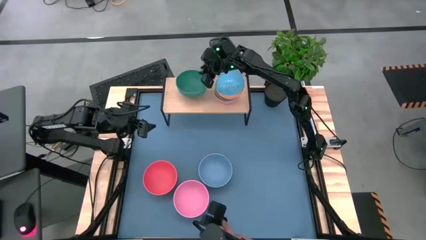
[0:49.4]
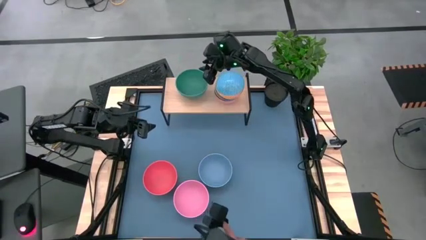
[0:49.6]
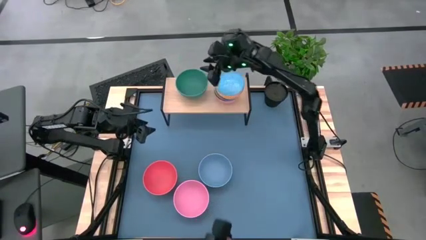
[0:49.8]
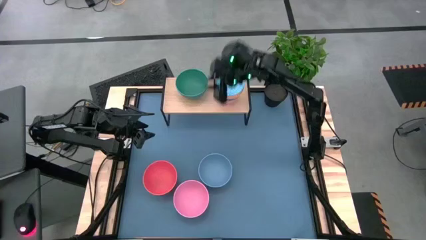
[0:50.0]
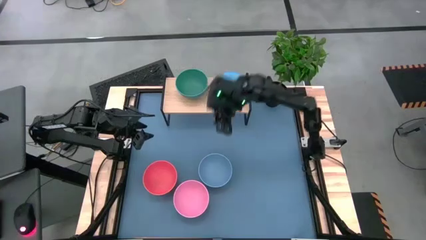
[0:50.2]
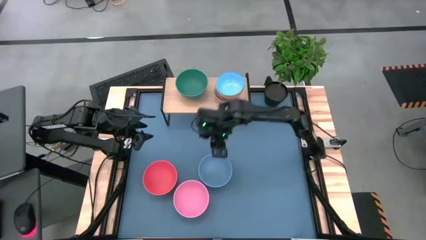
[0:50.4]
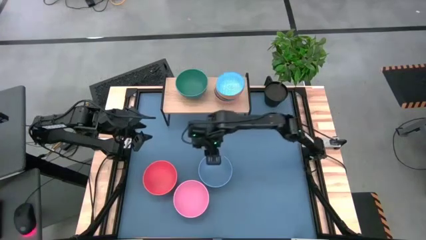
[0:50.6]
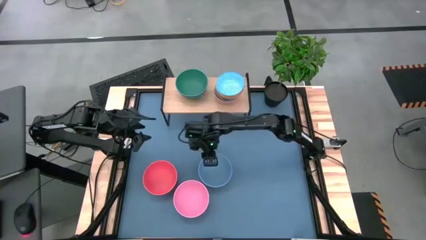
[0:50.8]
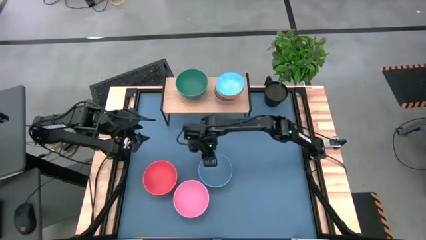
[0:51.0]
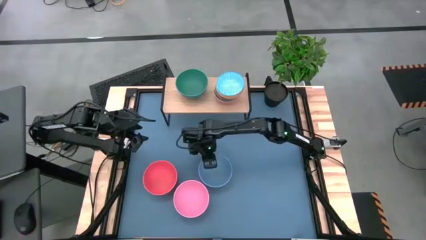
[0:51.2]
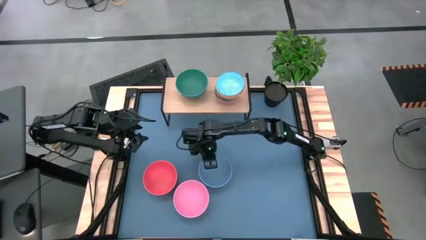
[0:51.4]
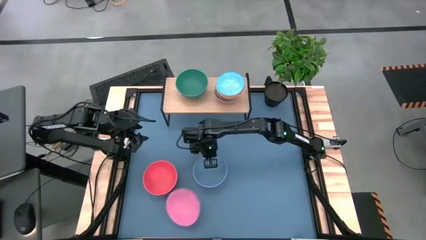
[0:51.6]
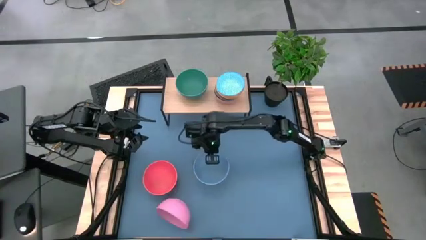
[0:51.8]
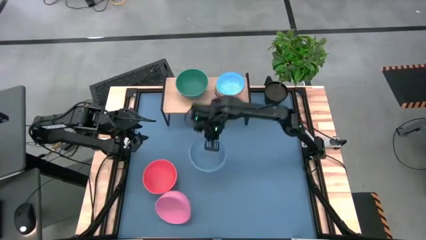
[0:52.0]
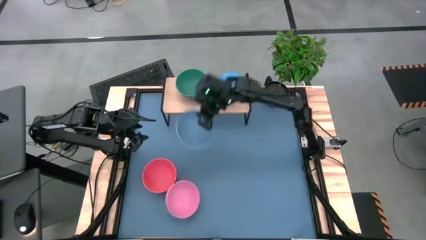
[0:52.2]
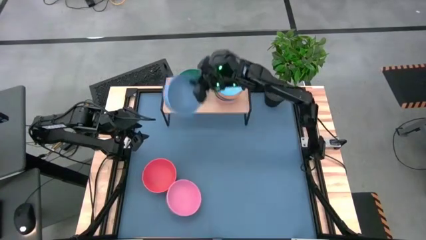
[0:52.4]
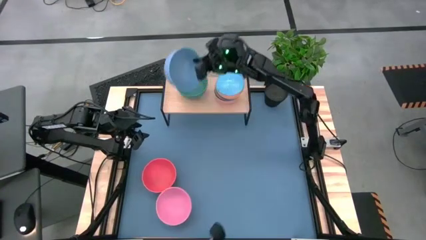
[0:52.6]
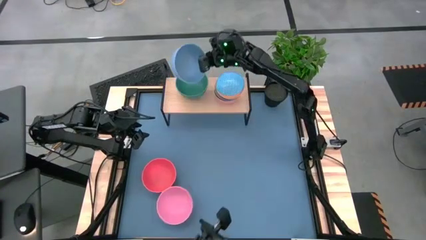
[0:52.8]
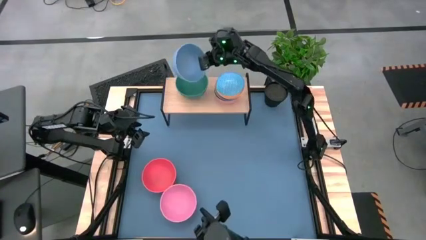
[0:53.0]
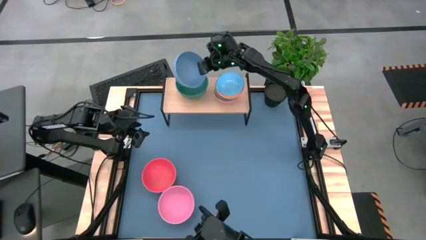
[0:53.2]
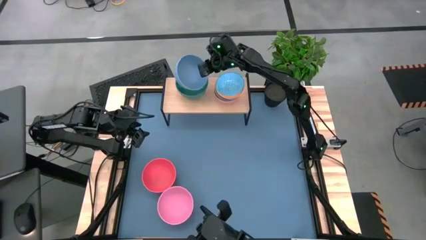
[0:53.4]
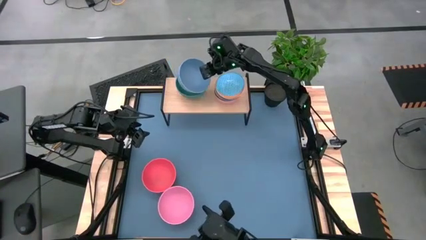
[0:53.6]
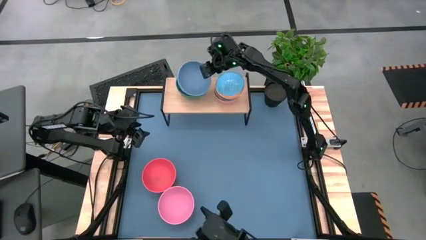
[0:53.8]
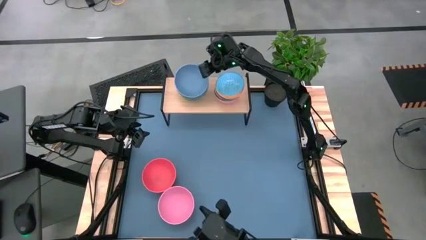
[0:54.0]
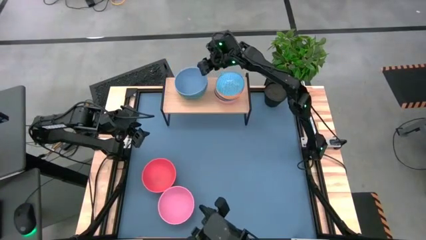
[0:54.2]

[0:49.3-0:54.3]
Task: Place and stack bowls onto a shelf
Stack the blue bowl on top of the green bowl on the shelf

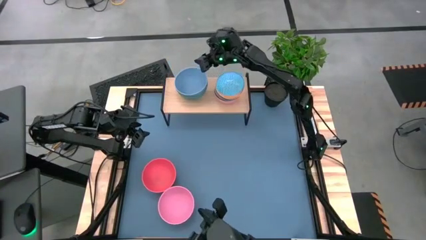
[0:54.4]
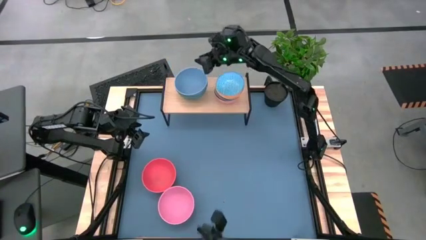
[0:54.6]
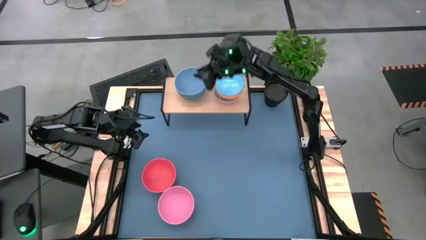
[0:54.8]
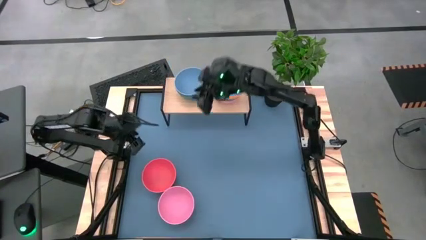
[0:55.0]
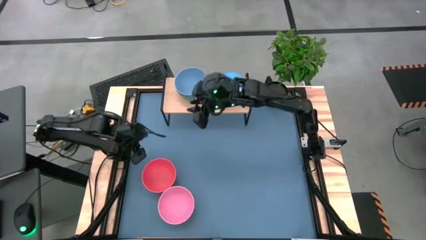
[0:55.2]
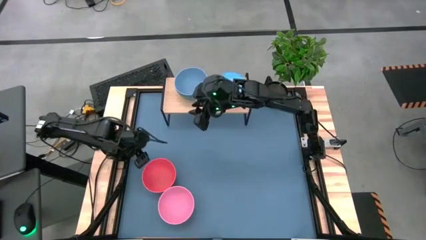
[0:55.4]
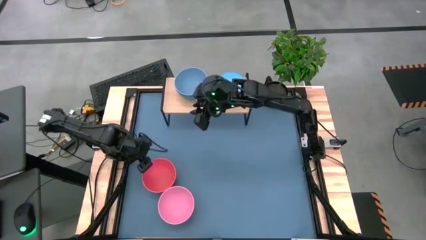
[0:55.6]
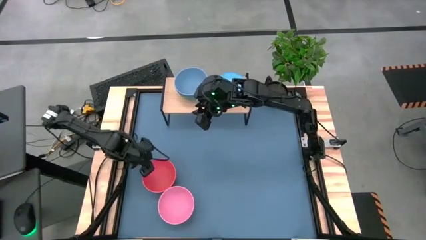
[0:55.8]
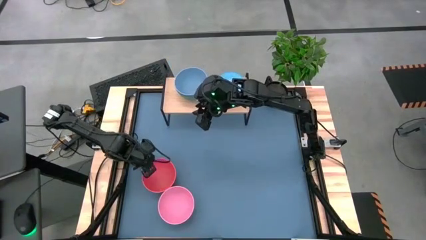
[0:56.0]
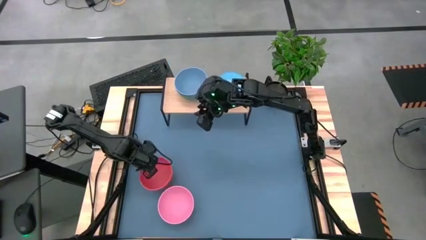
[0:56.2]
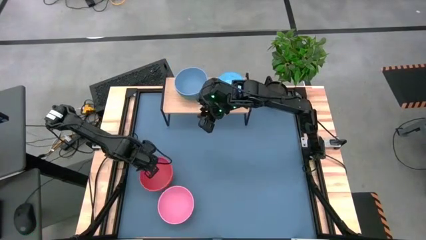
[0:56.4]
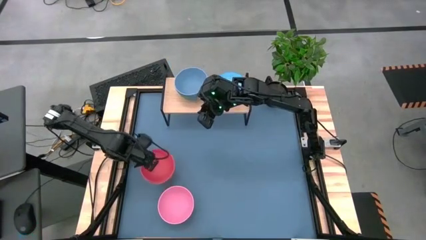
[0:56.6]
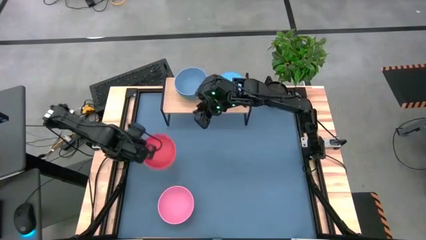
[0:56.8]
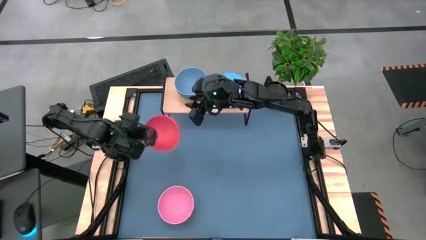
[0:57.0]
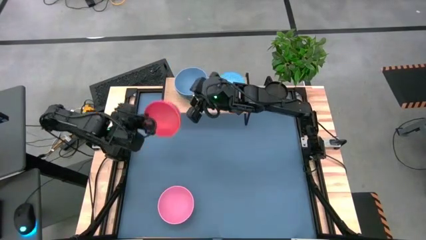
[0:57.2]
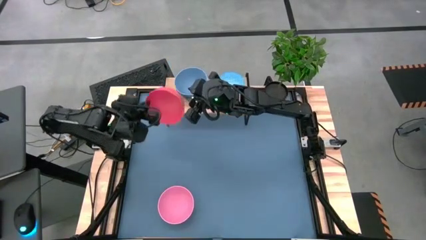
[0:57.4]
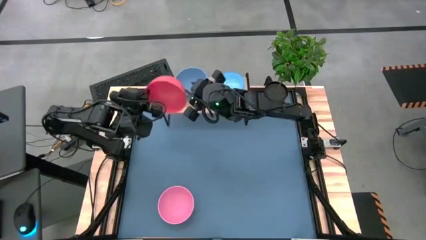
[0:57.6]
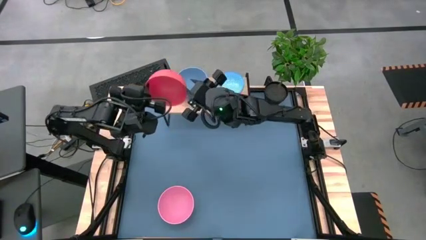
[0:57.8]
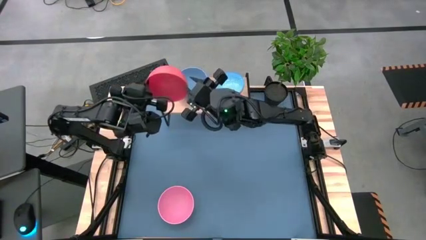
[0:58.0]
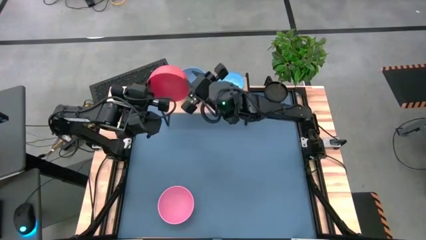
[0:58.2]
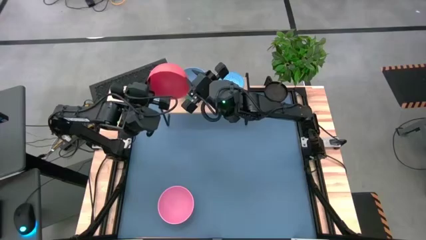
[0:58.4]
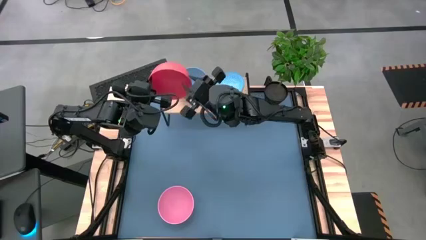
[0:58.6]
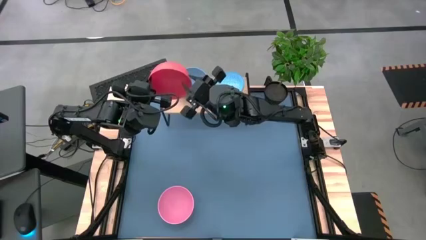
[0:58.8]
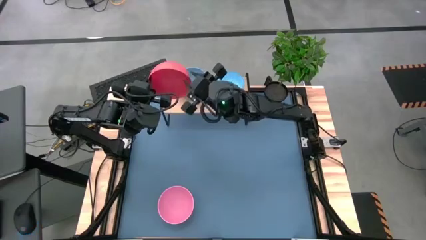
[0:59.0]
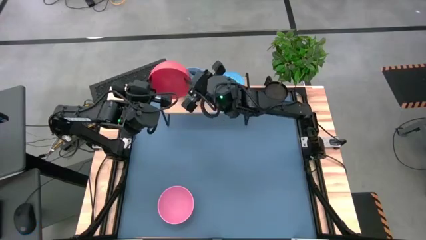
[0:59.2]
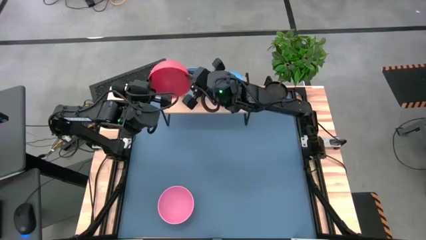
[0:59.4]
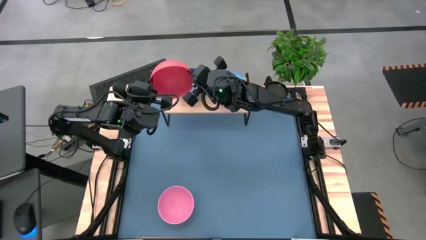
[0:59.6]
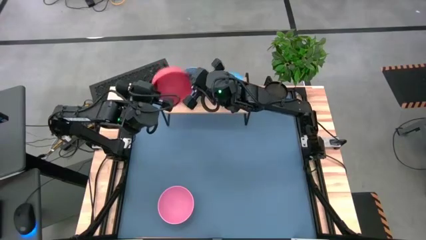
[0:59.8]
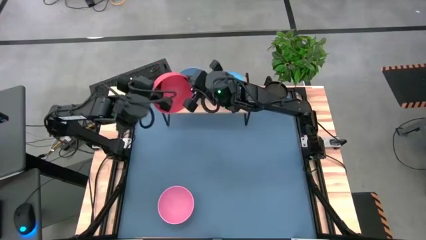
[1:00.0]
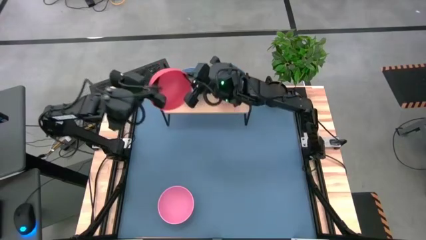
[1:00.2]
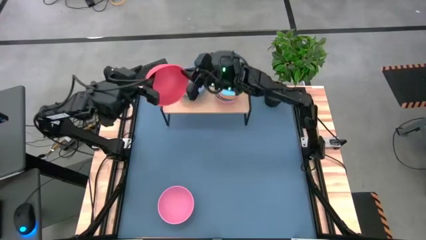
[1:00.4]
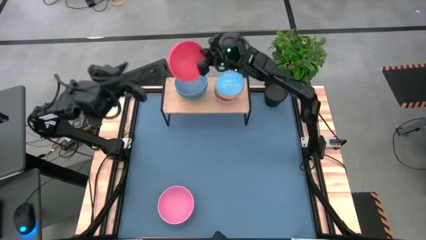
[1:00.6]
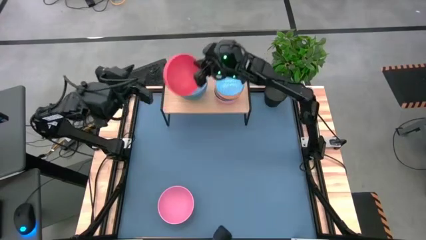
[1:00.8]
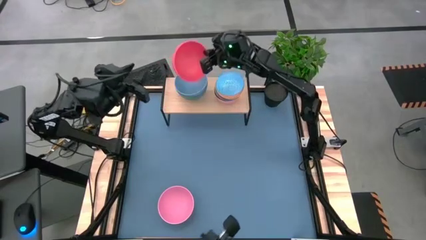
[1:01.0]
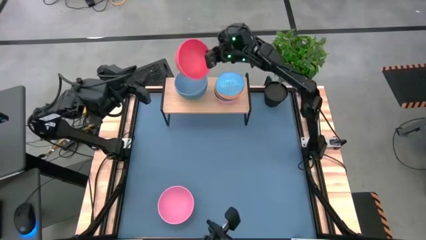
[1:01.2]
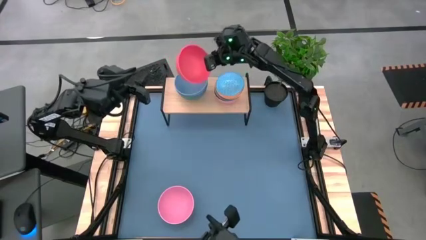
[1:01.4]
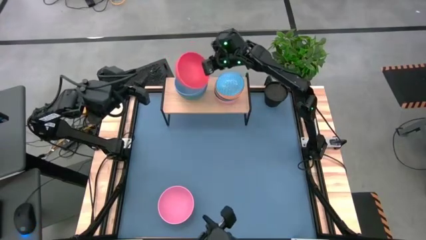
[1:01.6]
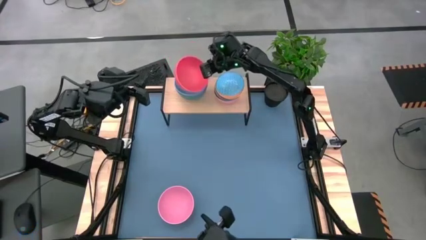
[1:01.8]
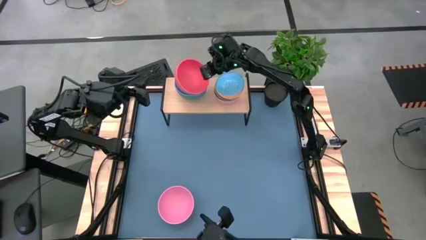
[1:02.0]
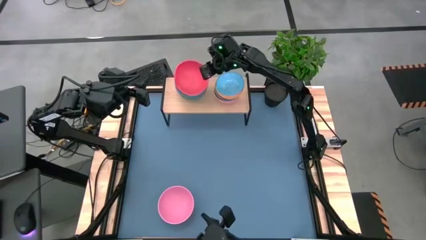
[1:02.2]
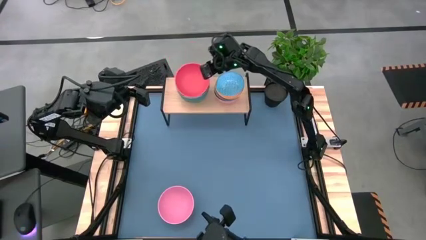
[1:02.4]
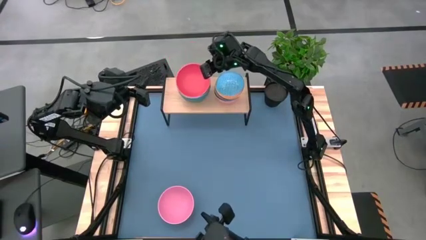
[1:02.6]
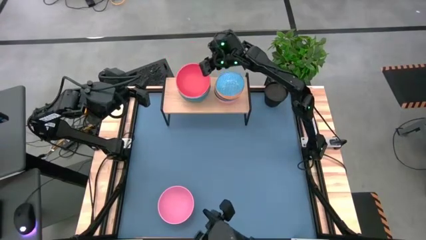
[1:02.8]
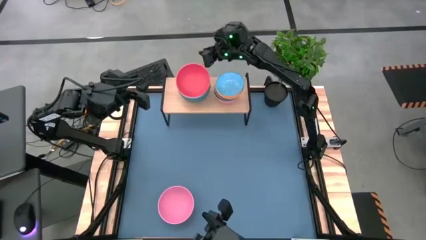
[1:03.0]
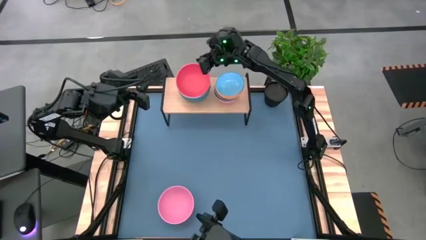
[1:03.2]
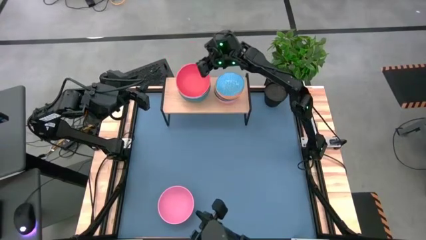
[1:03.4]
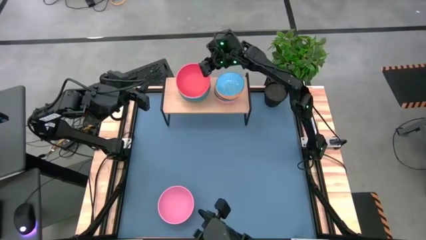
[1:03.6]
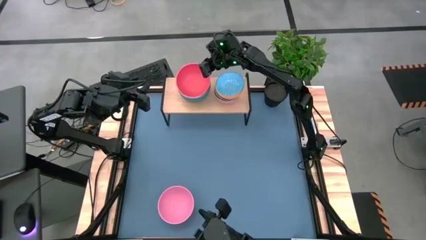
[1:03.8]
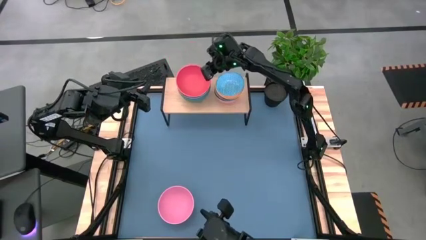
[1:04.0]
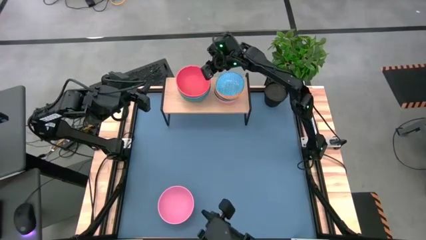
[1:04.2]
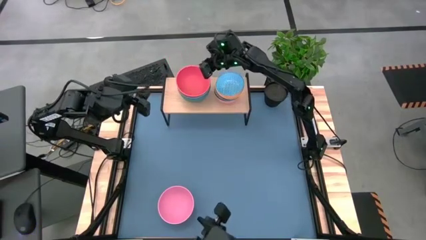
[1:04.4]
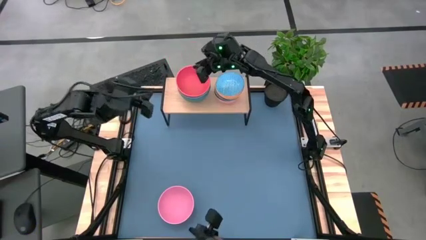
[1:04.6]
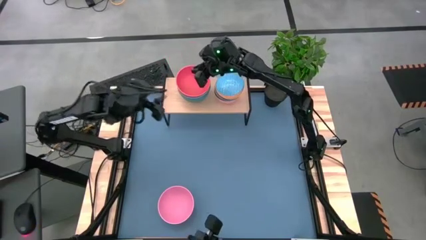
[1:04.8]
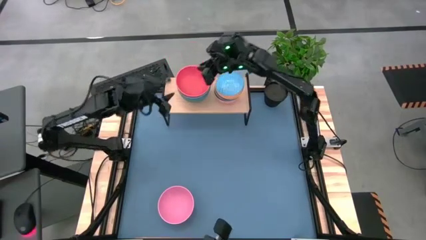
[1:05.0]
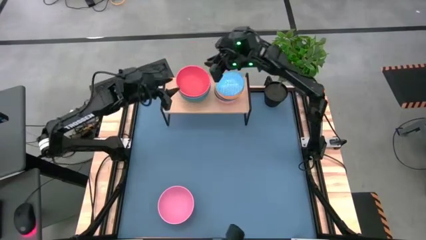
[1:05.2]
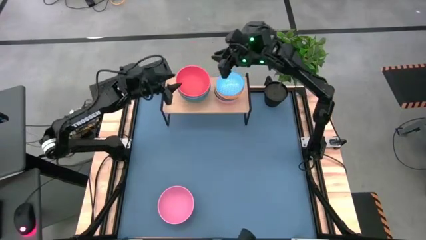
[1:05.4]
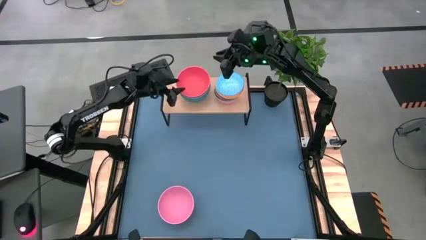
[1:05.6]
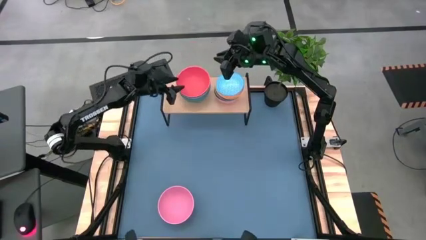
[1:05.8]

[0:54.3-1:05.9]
Stack the red bowl on top of the blue bowl on the shelf
